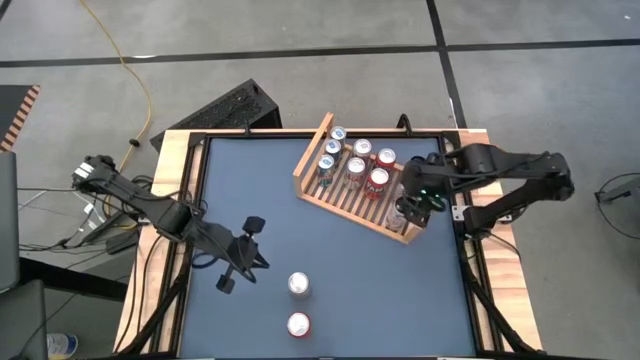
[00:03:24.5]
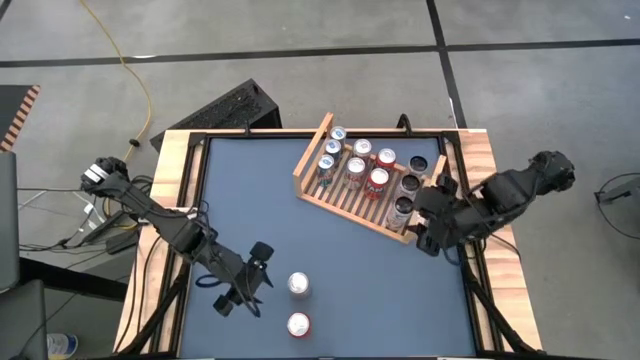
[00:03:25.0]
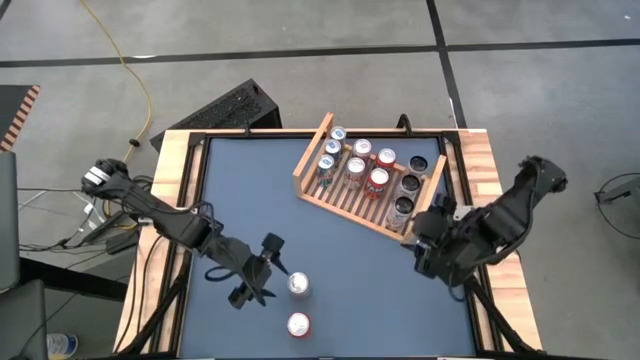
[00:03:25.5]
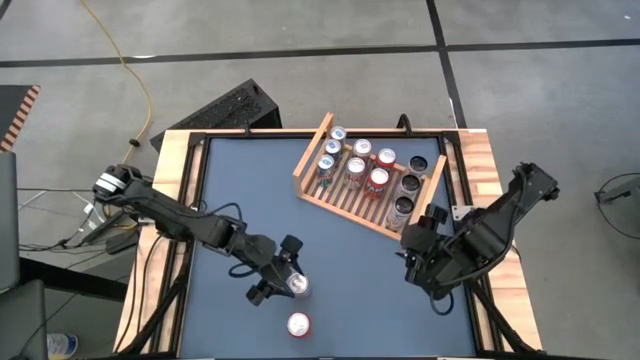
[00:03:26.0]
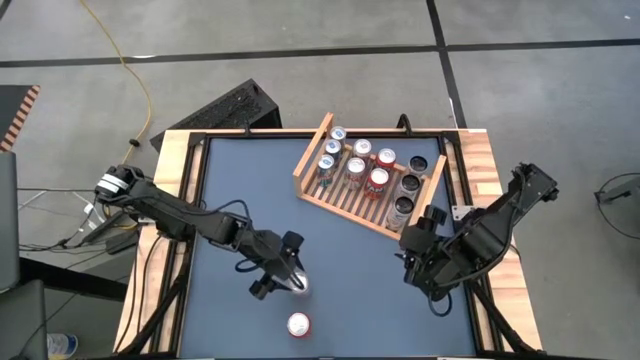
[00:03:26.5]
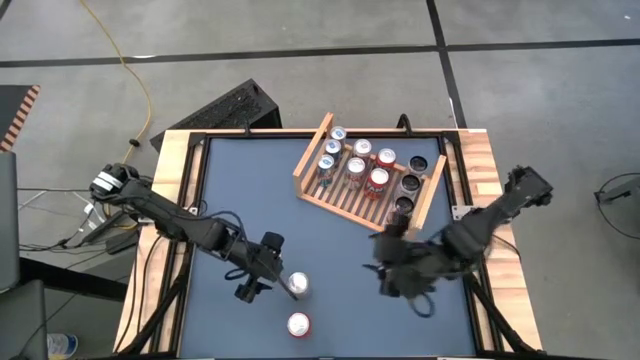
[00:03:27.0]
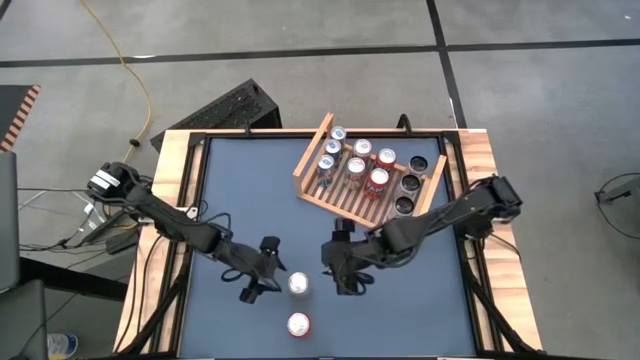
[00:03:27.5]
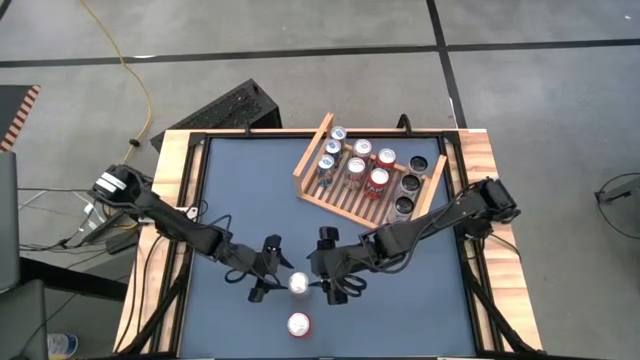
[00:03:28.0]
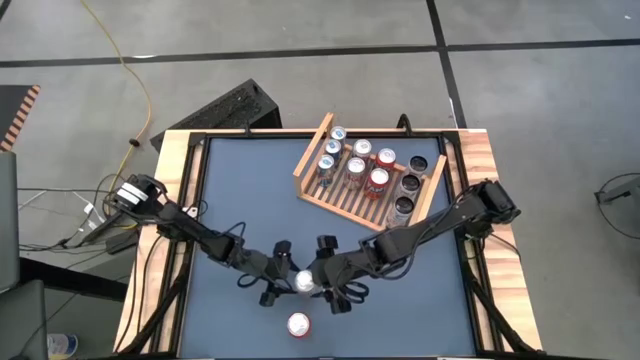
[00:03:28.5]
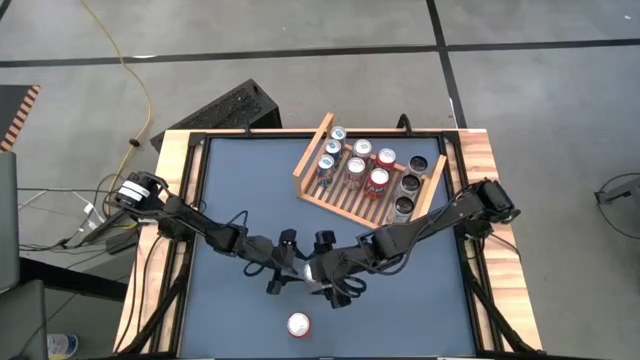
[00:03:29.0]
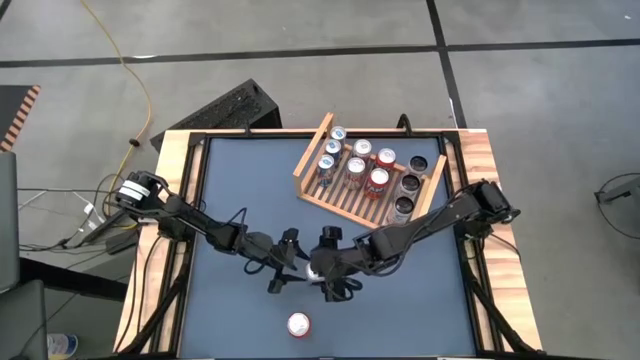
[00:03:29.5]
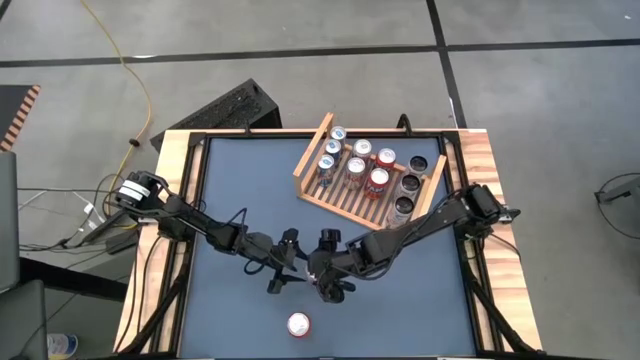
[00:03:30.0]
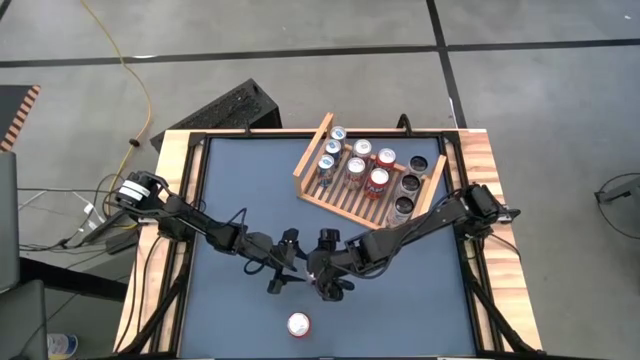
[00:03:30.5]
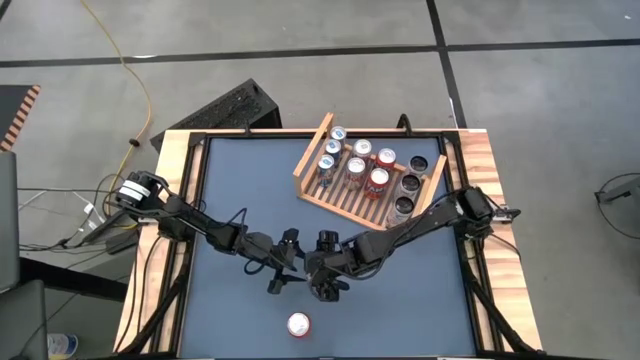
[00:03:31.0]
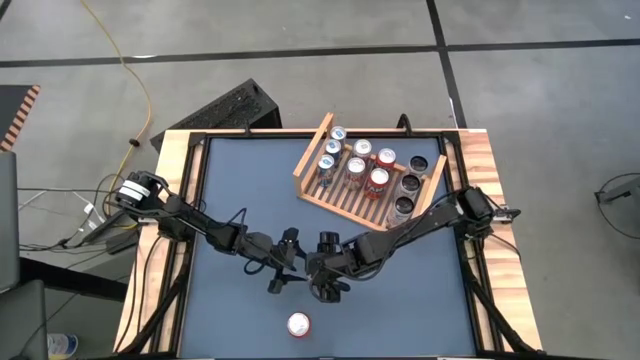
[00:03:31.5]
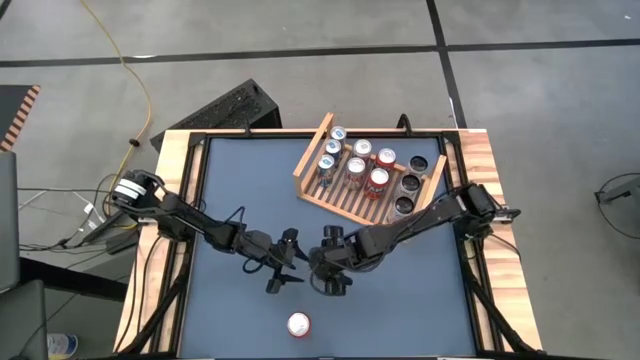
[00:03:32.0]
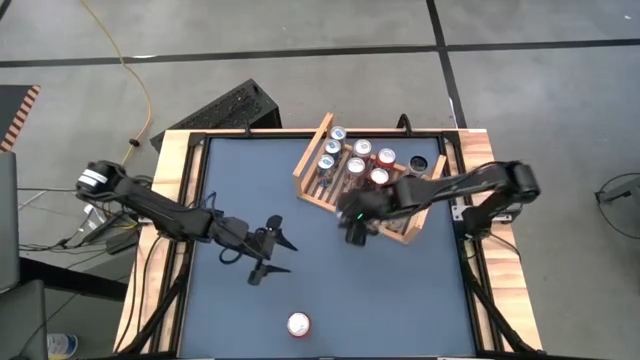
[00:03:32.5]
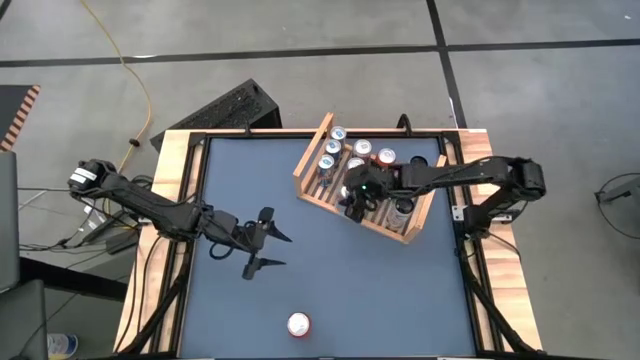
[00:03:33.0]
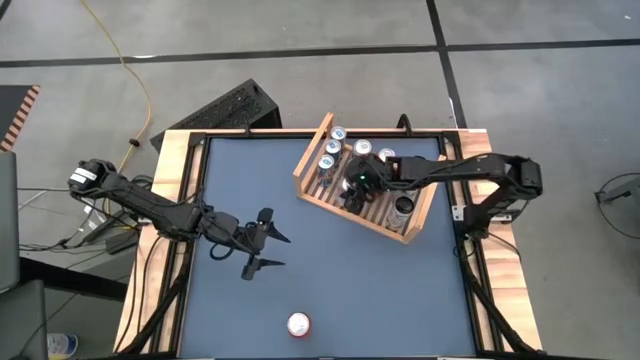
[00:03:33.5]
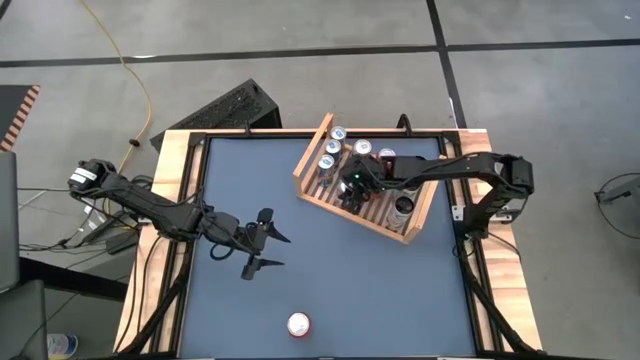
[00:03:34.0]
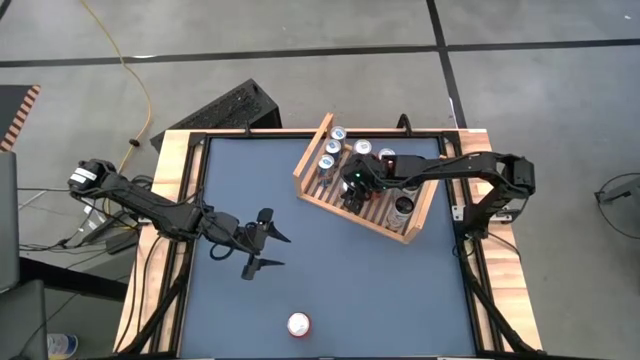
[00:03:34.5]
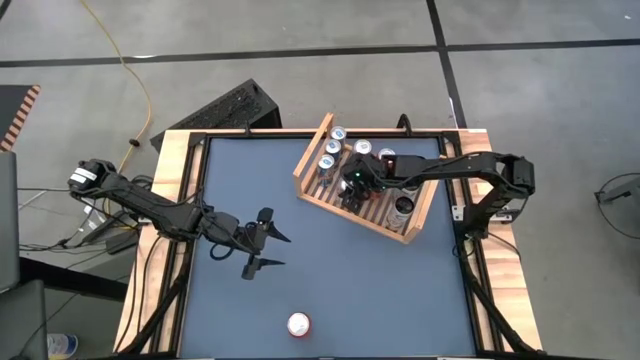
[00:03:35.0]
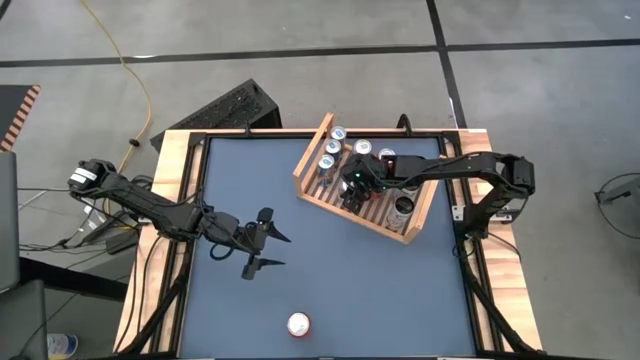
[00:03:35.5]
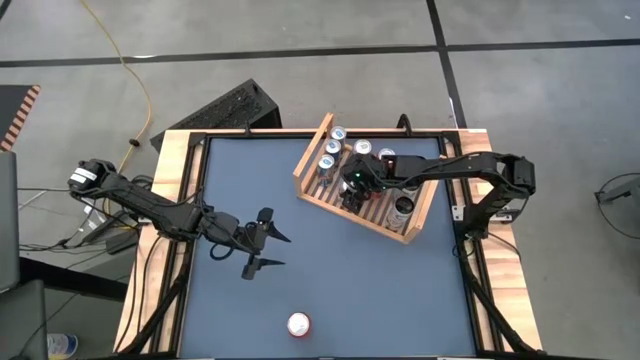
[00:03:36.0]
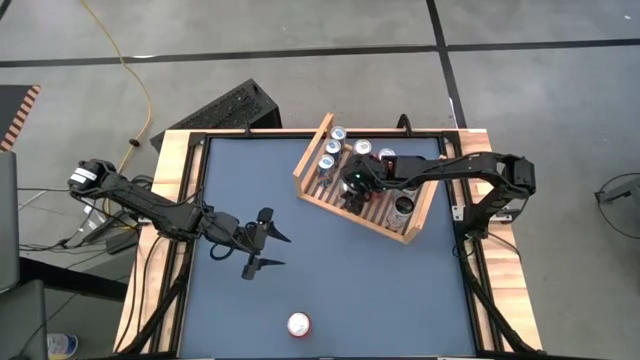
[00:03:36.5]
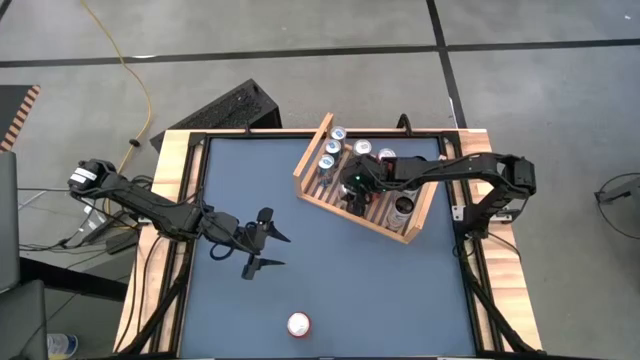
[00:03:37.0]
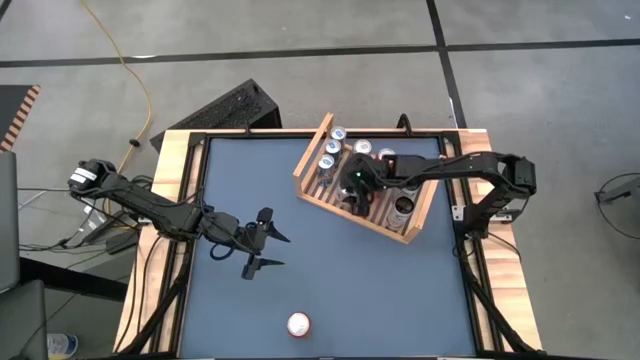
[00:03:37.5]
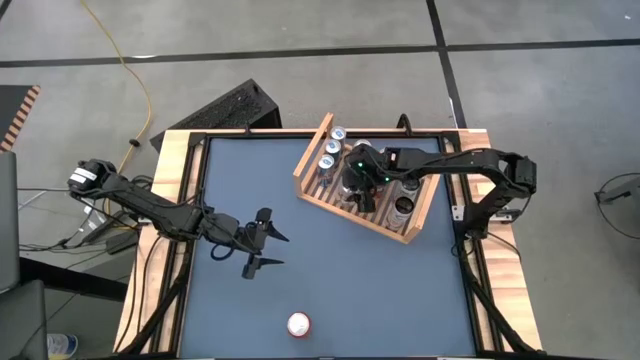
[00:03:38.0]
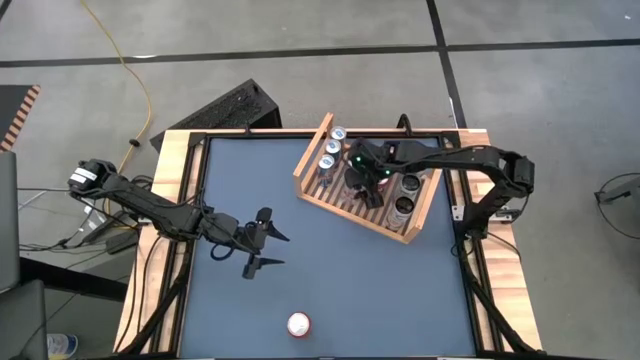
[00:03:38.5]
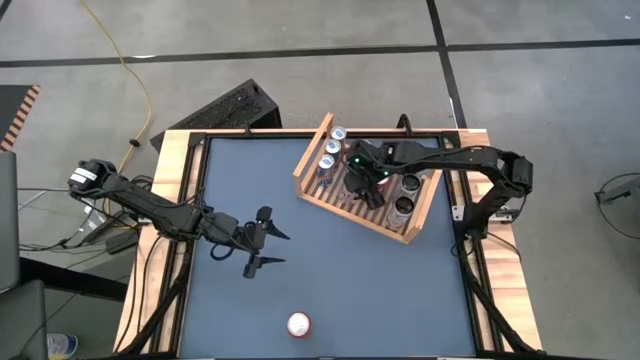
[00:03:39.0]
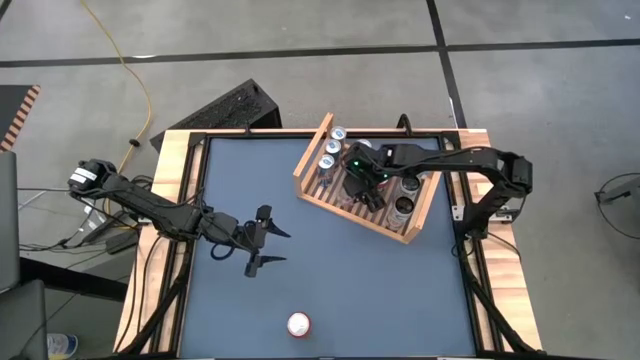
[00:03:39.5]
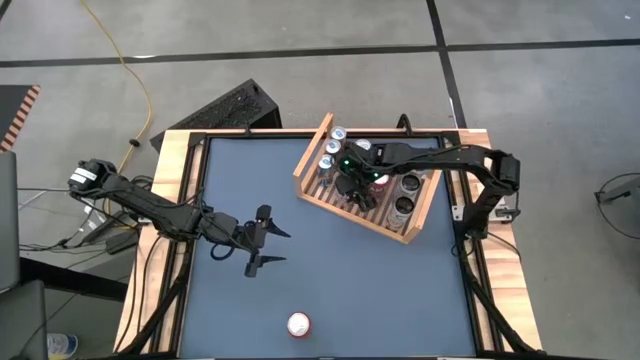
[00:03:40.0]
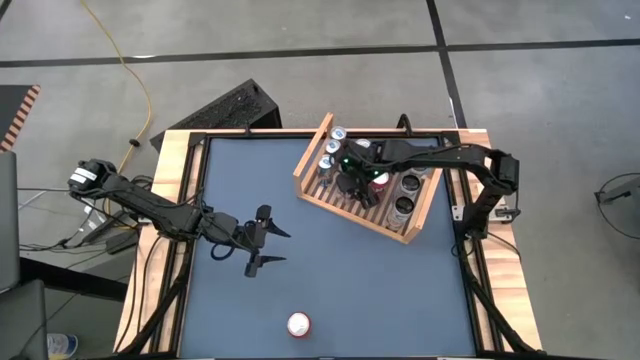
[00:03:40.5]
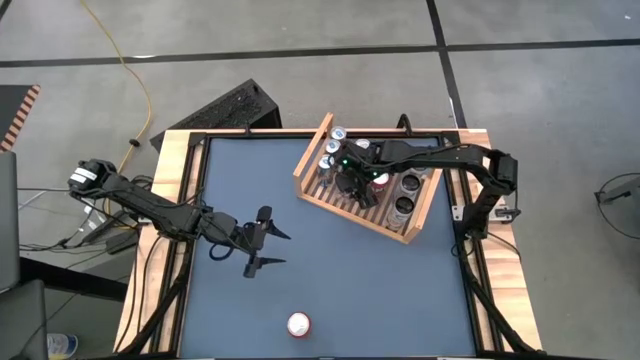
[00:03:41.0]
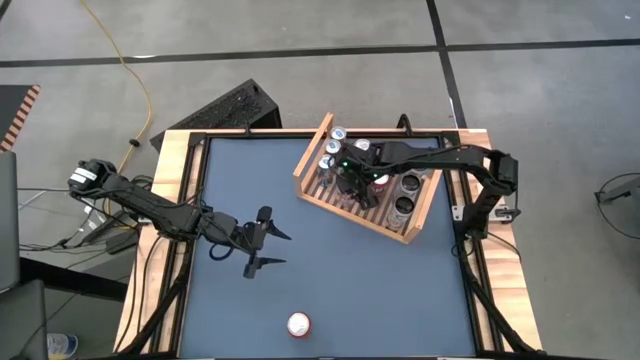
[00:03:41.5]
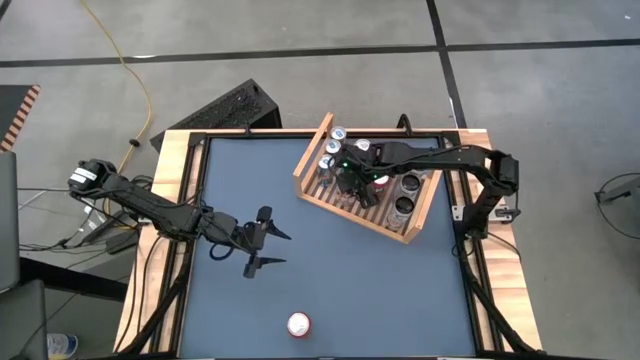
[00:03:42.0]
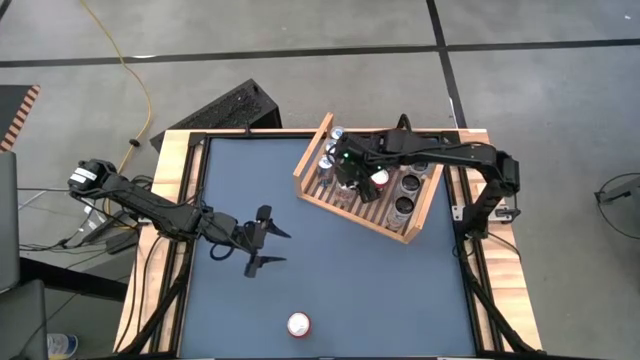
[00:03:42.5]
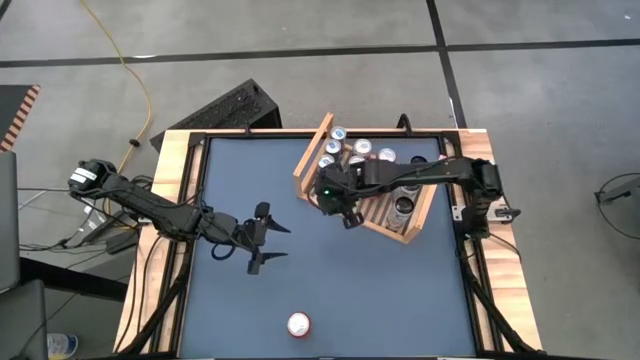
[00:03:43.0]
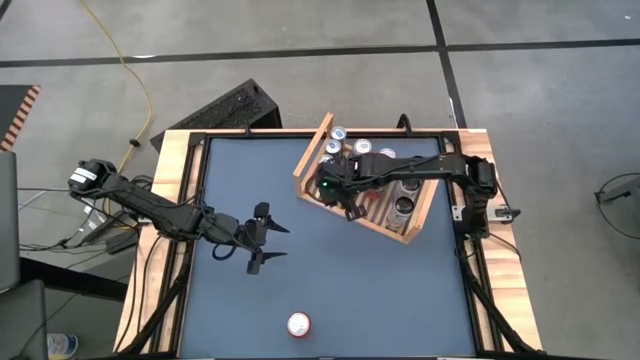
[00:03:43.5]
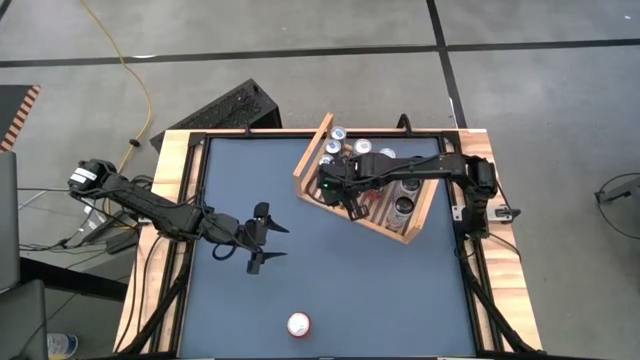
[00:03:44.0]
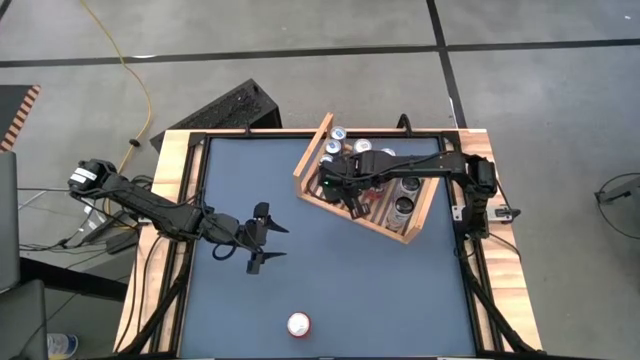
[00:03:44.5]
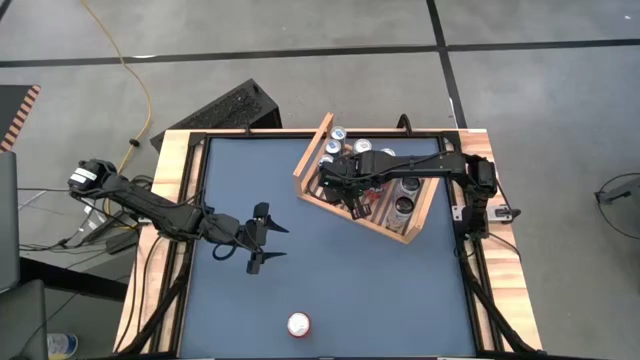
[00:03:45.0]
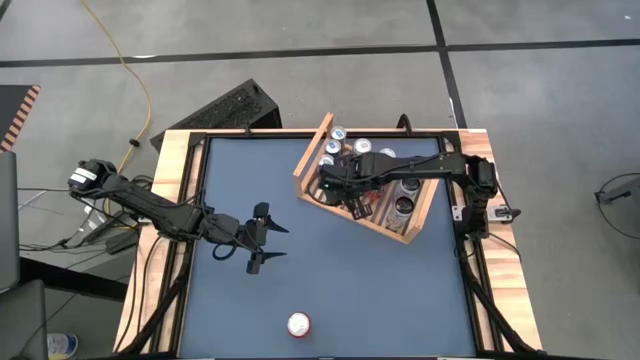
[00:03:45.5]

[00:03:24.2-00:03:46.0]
Task: Place canned beverage on shelf
Put the silver soda can aligned with the other silver soda cans on the shelf
